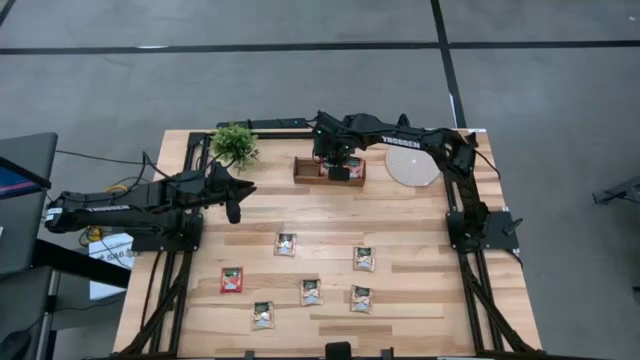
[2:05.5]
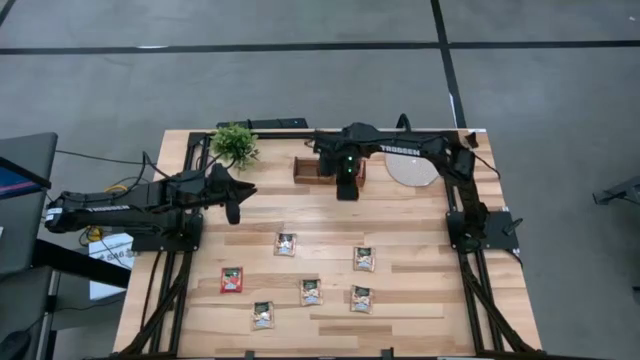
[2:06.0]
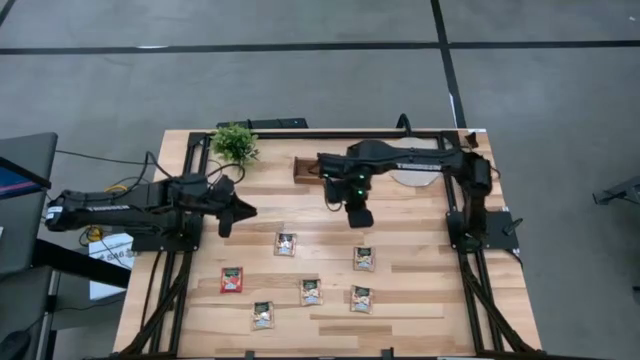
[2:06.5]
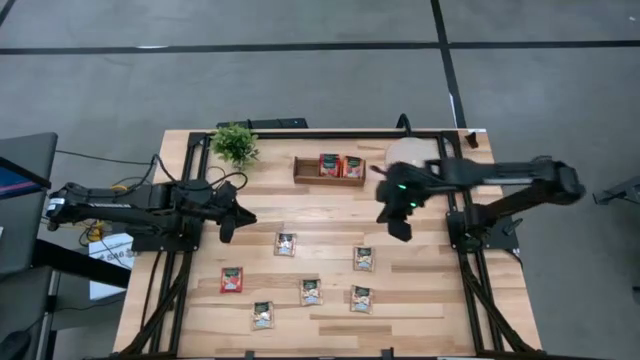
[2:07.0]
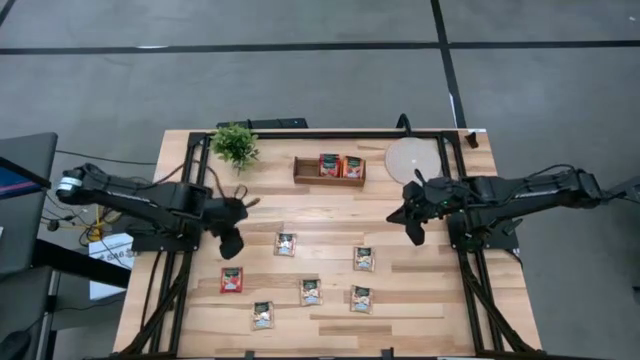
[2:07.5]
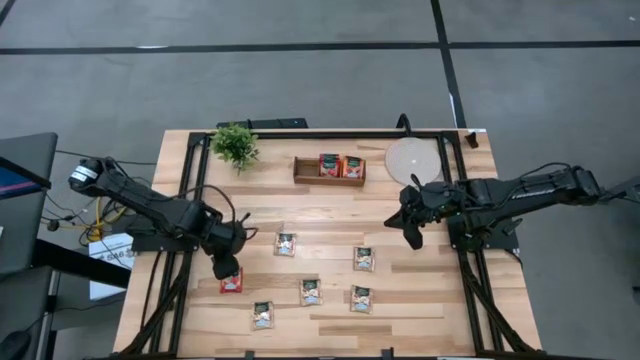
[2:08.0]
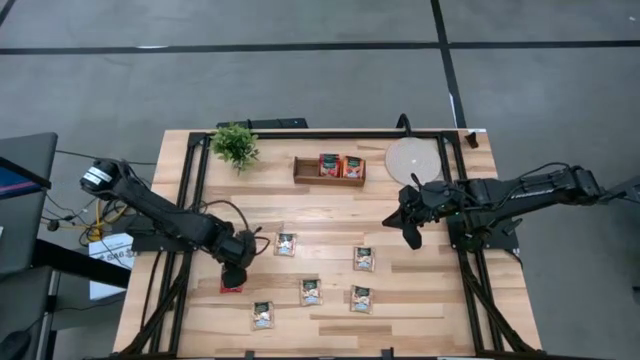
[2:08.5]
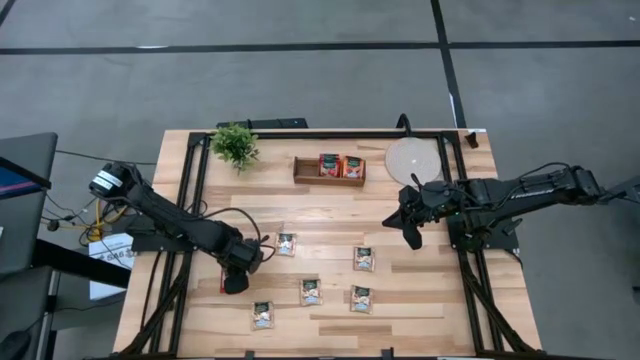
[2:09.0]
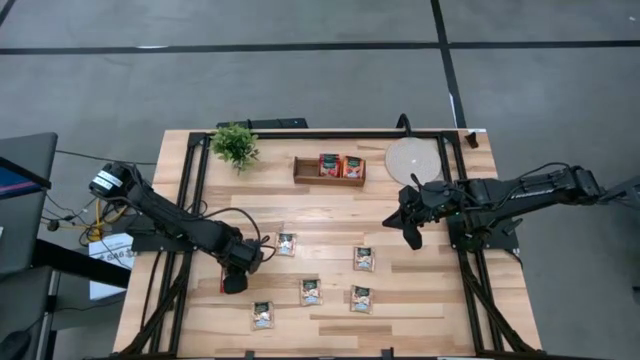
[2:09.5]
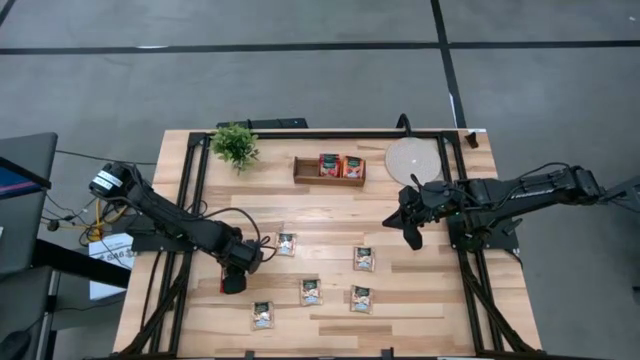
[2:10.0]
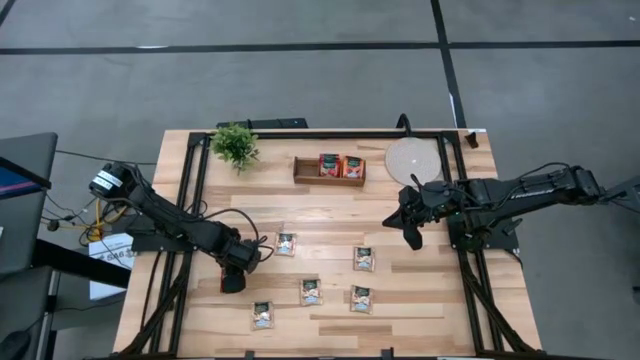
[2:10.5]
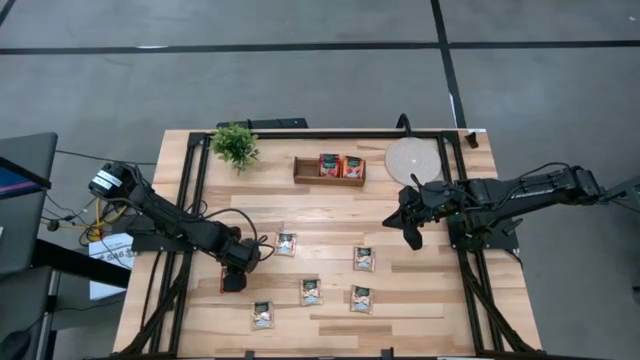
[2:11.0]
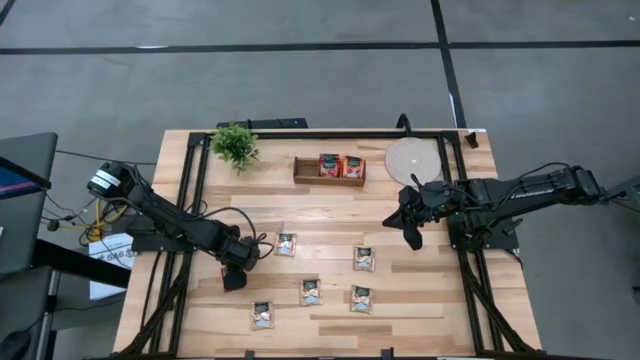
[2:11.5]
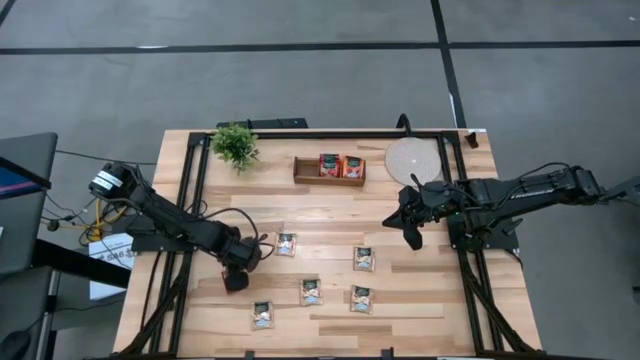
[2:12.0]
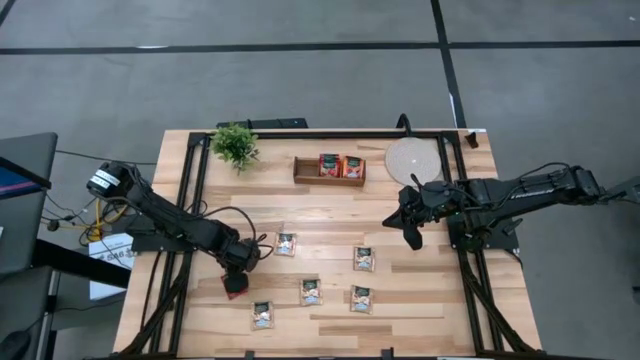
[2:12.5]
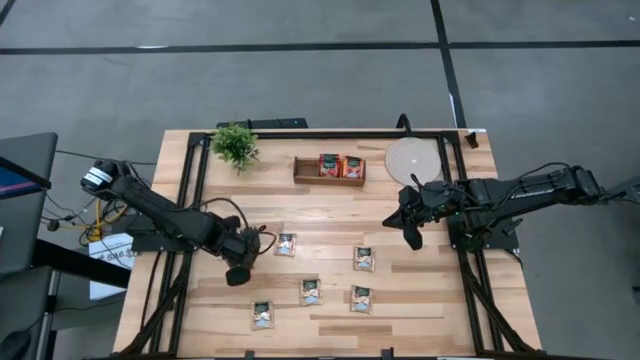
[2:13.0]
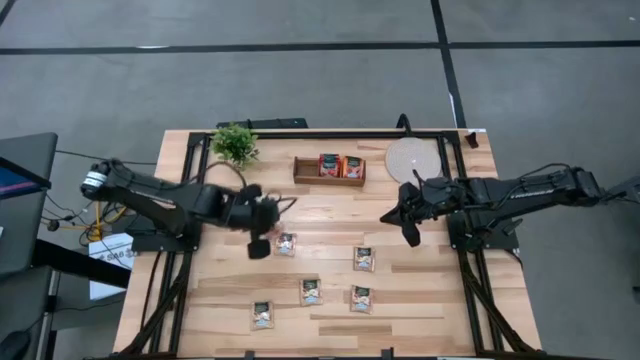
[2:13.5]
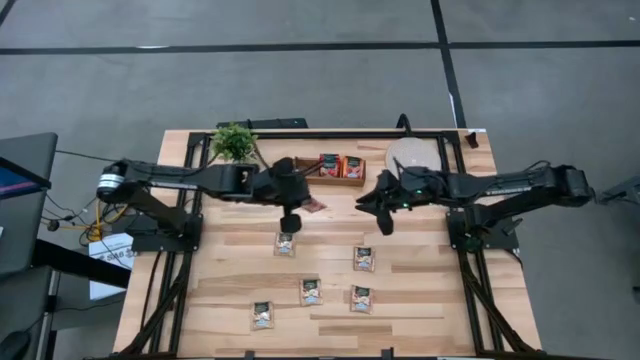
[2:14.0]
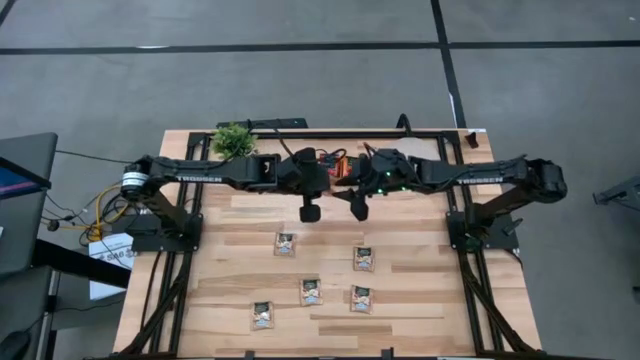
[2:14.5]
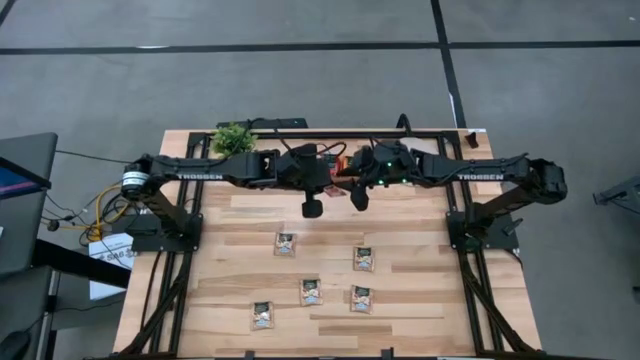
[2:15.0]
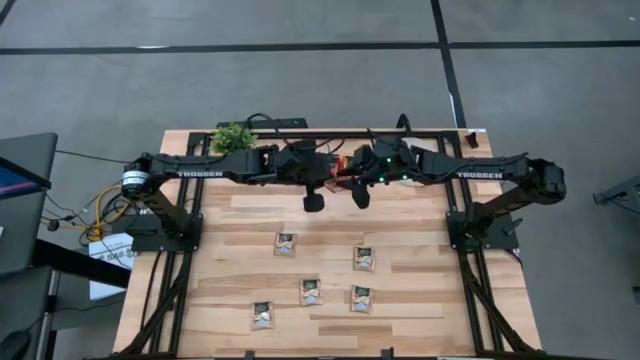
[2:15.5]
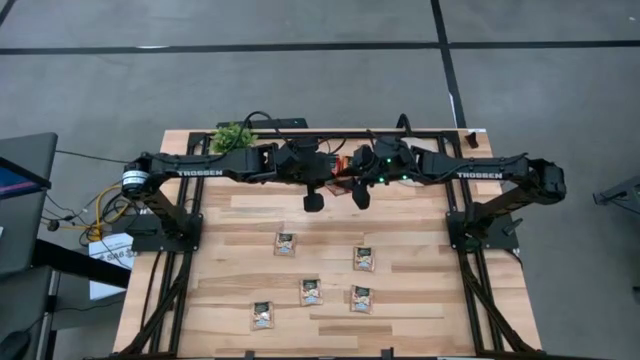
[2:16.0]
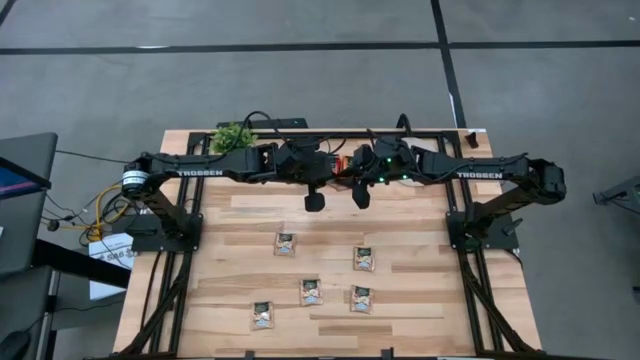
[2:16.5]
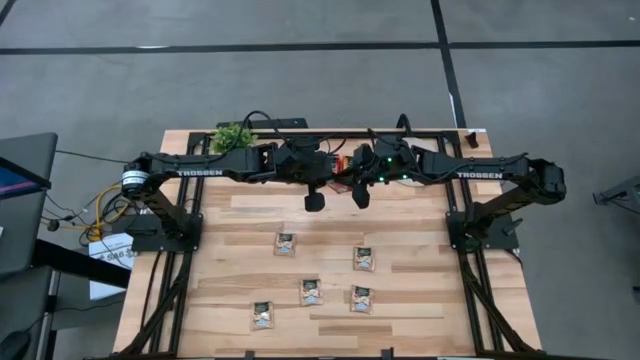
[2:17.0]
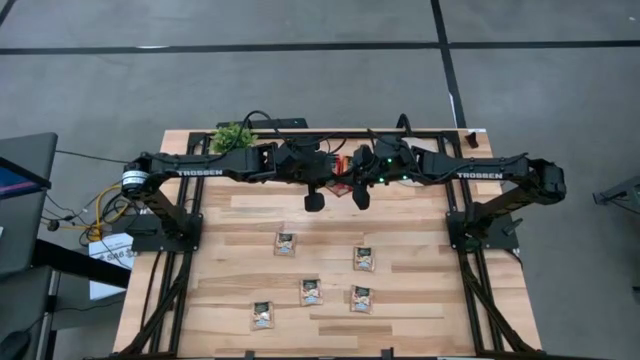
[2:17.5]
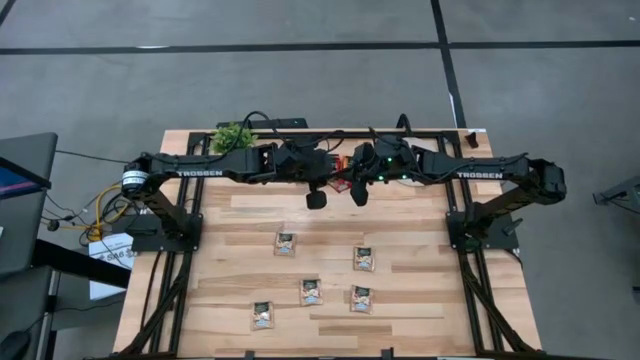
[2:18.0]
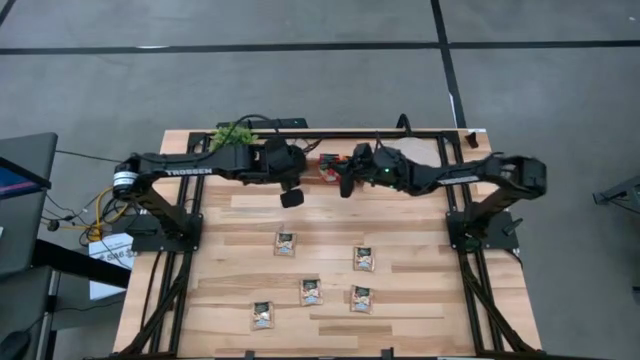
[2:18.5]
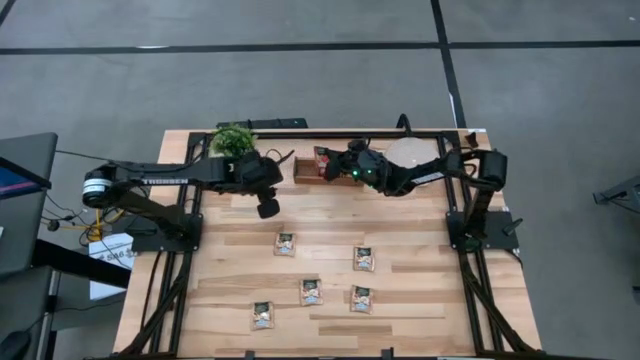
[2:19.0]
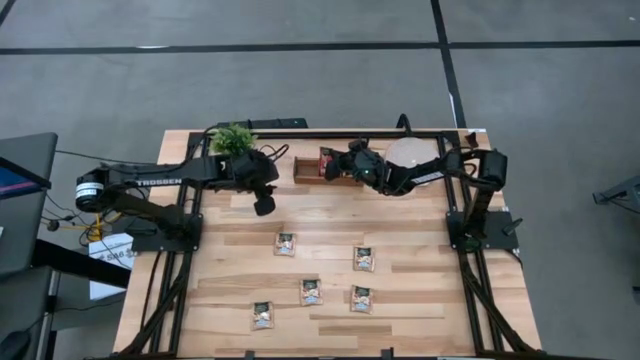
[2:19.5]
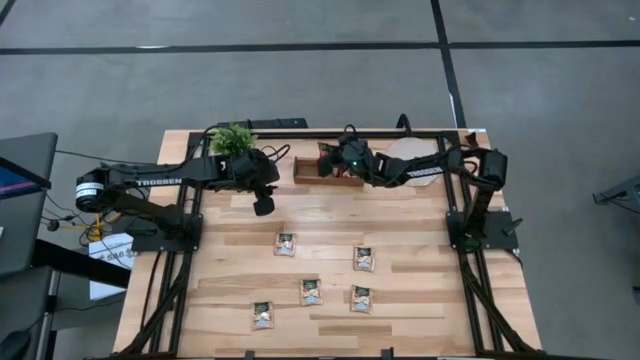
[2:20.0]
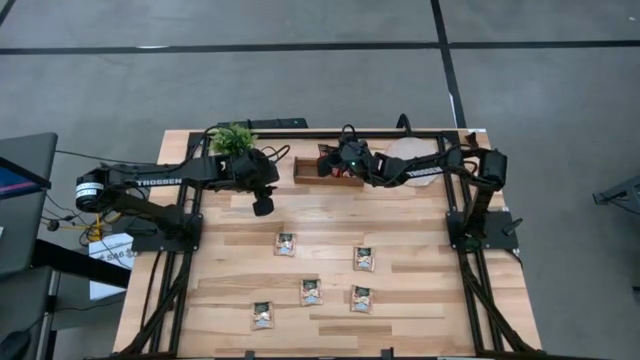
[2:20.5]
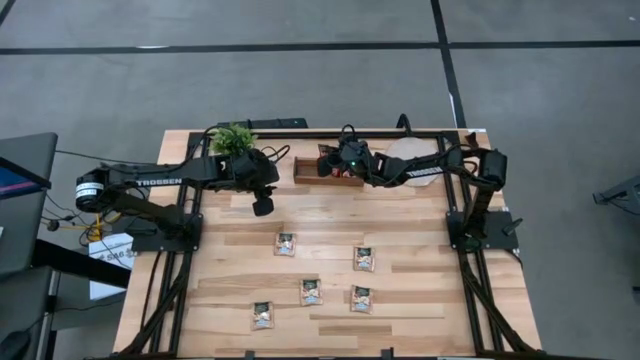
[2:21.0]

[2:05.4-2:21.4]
Task: Pick & Place Tea
Put the red tea bag into the middle section of the wooden organizer

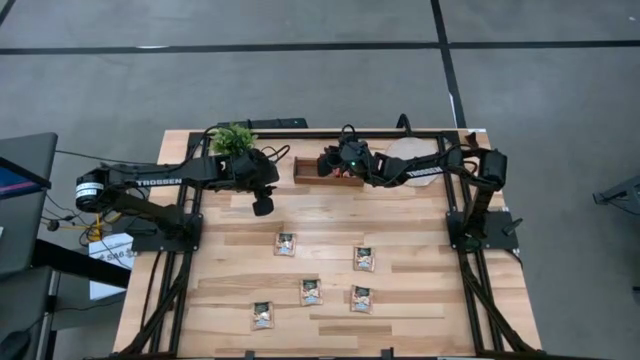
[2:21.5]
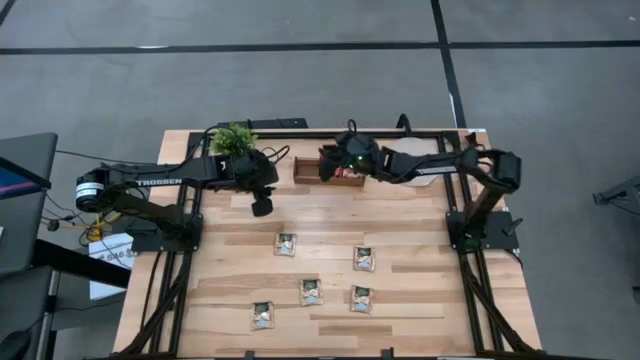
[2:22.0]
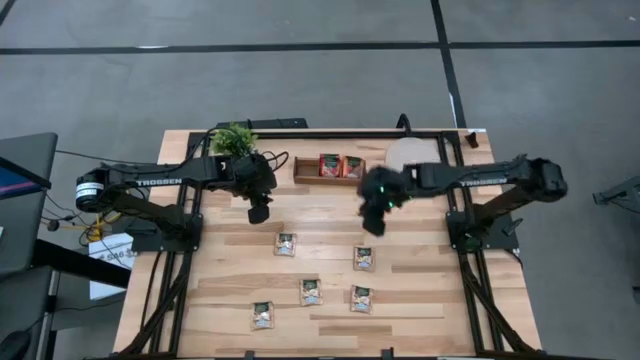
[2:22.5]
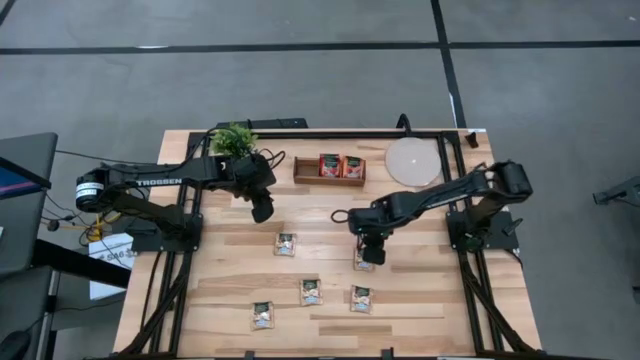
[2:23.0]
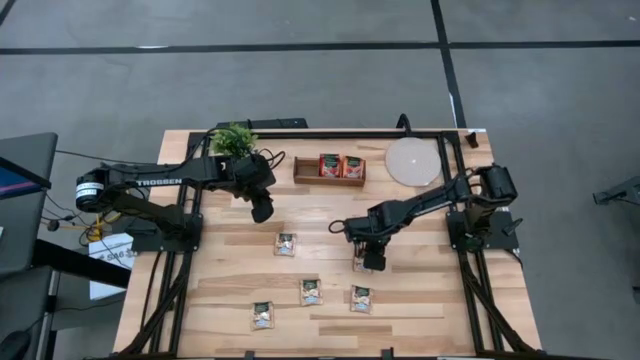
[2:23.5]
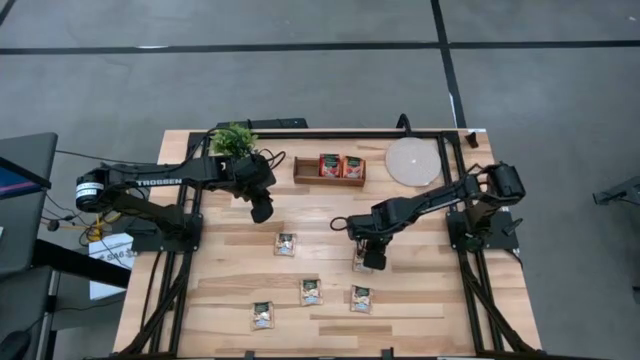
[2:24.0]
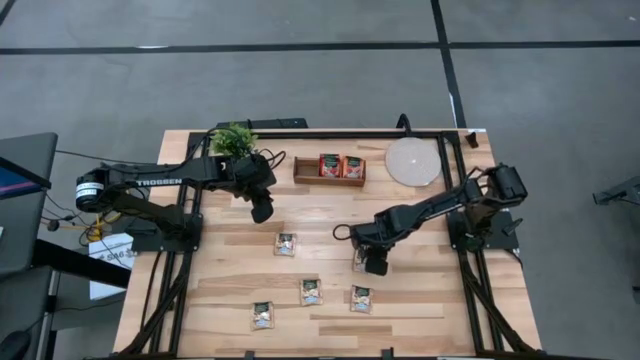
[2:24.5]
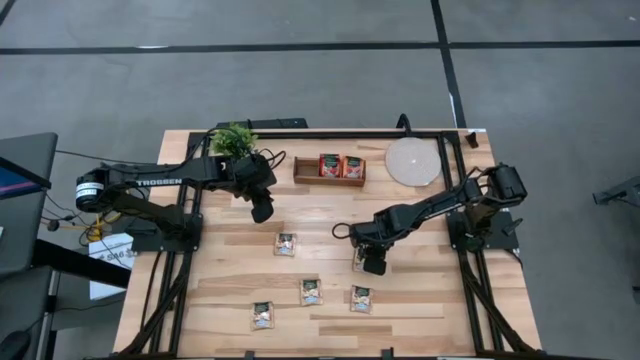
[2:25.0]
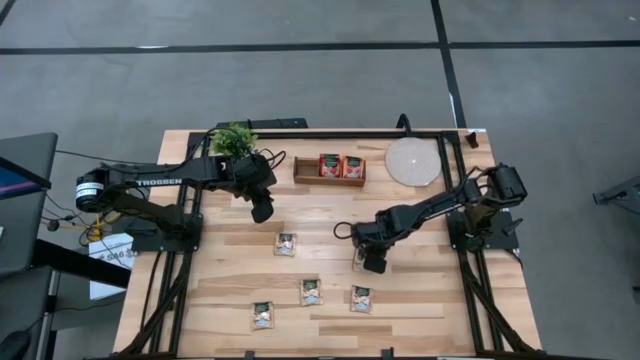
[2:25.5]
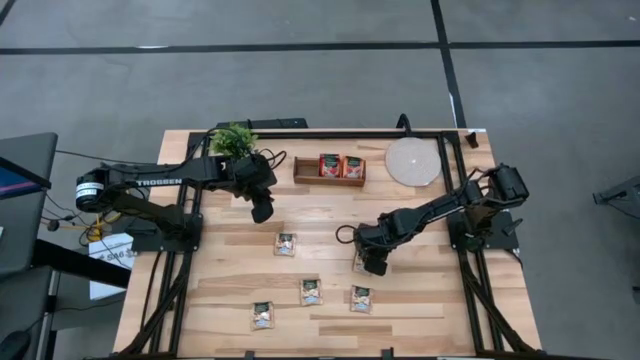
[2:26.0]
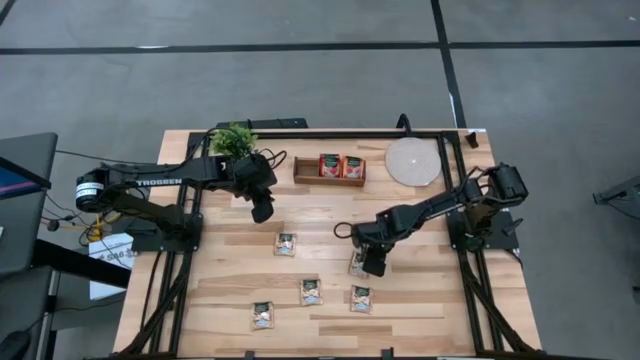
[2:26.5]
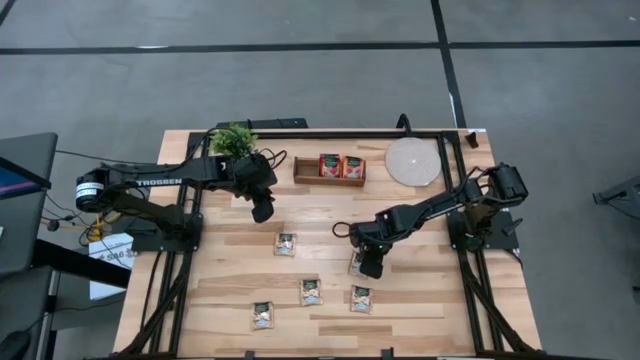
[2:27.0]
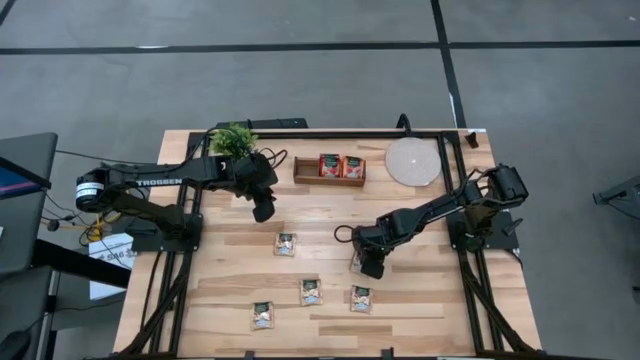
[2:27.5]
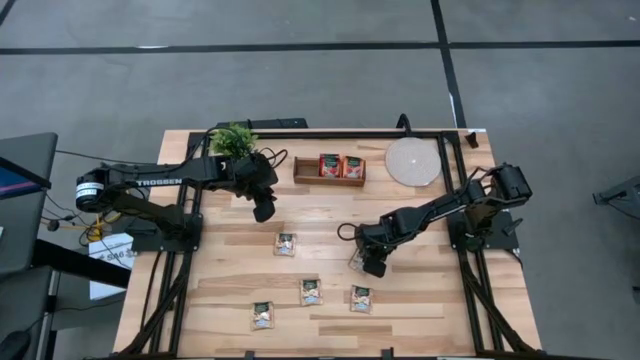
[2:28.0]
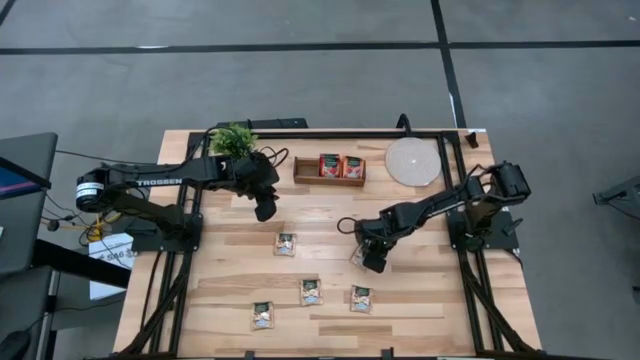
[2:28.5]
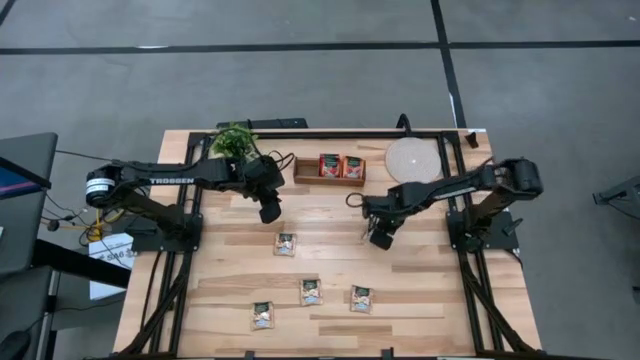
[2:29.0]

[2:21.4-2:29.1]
Put the brown tea bag into the left section of the wooden organizer
